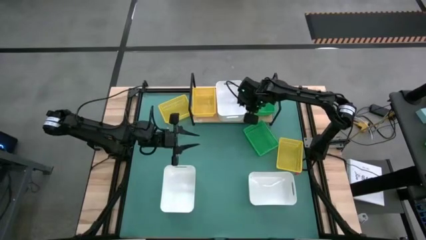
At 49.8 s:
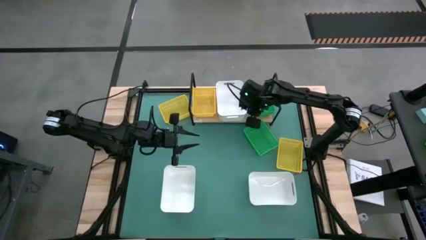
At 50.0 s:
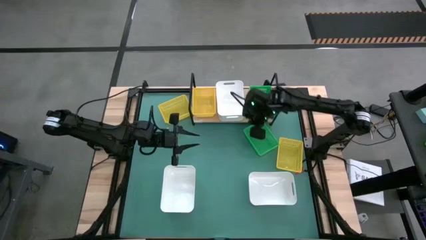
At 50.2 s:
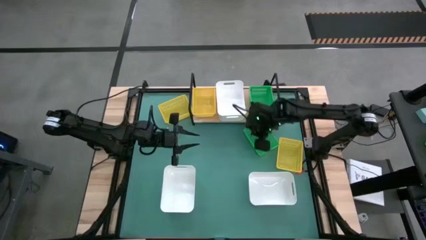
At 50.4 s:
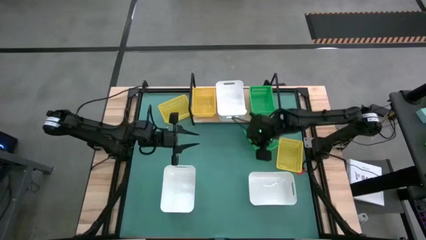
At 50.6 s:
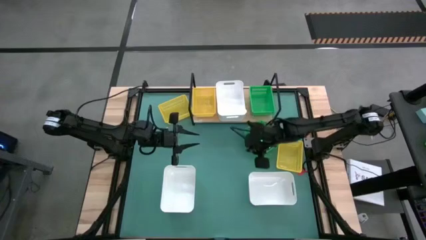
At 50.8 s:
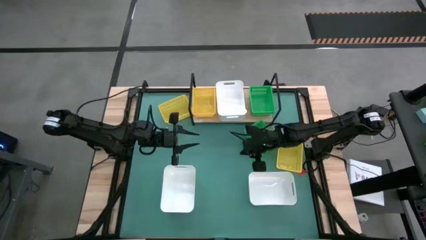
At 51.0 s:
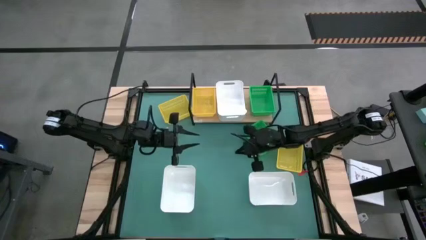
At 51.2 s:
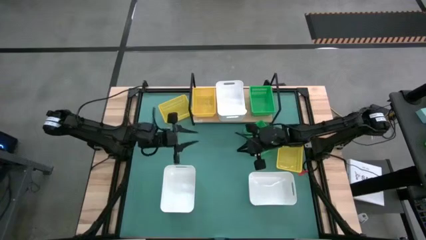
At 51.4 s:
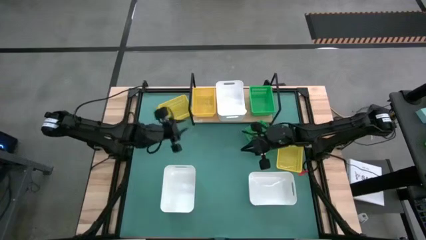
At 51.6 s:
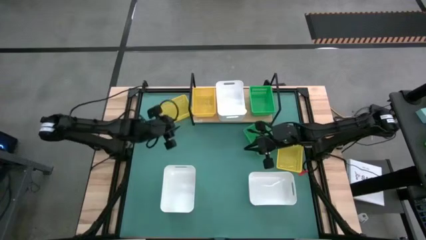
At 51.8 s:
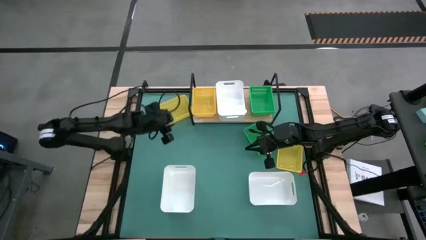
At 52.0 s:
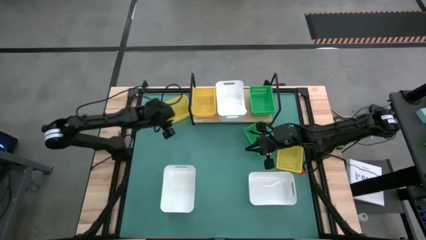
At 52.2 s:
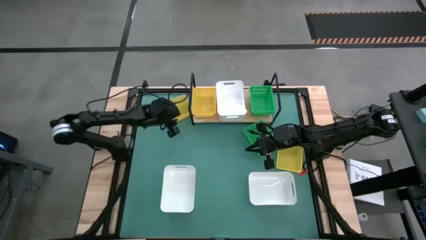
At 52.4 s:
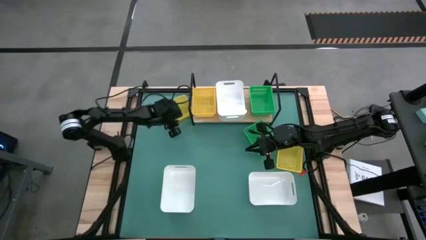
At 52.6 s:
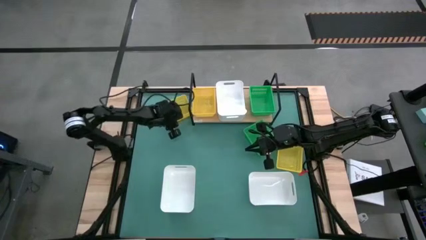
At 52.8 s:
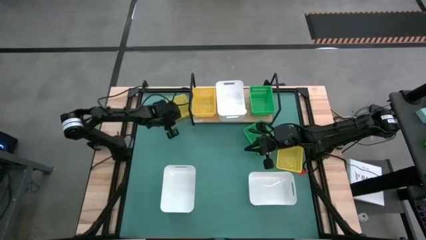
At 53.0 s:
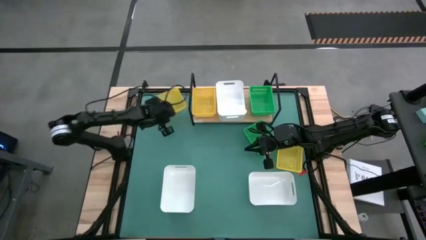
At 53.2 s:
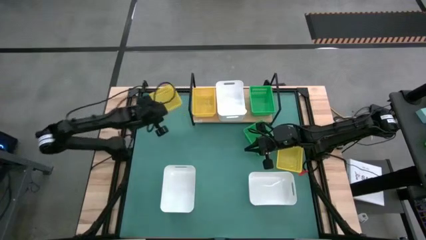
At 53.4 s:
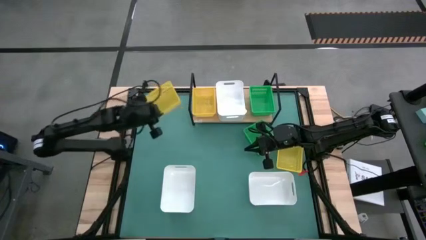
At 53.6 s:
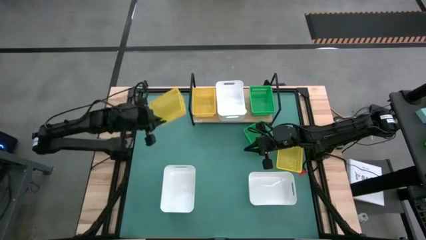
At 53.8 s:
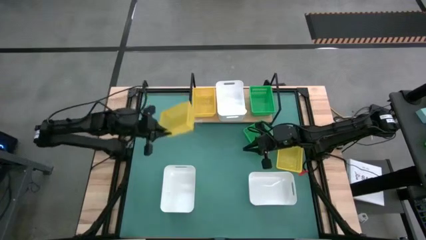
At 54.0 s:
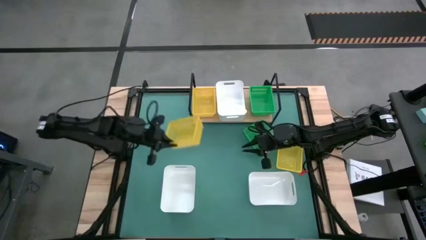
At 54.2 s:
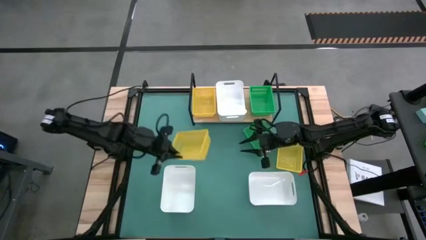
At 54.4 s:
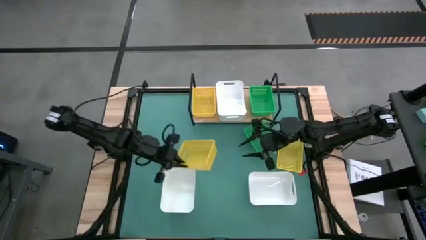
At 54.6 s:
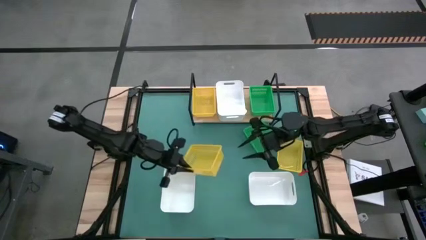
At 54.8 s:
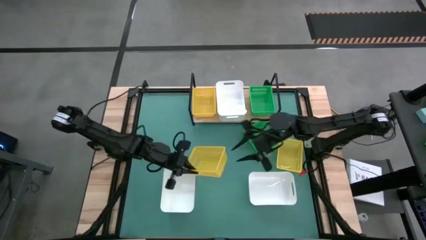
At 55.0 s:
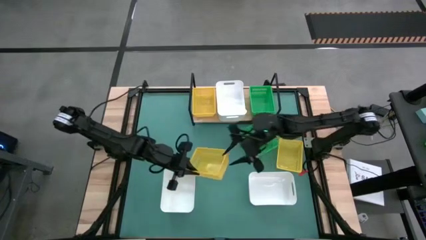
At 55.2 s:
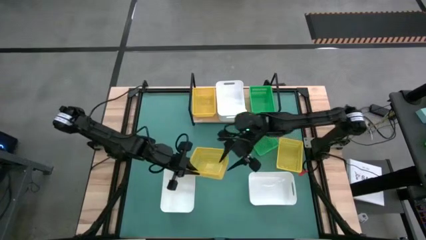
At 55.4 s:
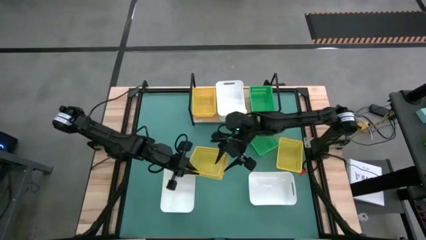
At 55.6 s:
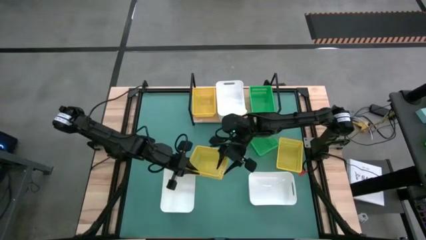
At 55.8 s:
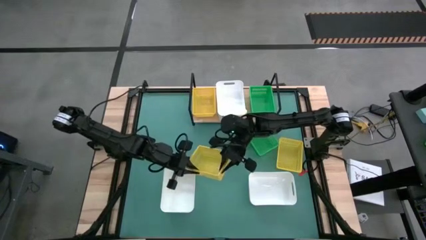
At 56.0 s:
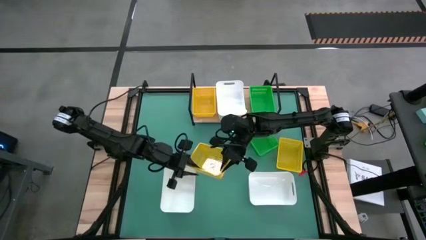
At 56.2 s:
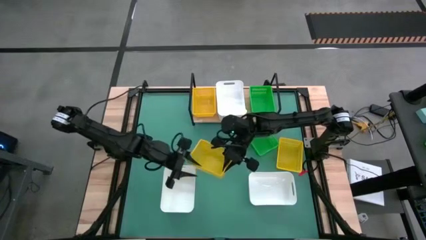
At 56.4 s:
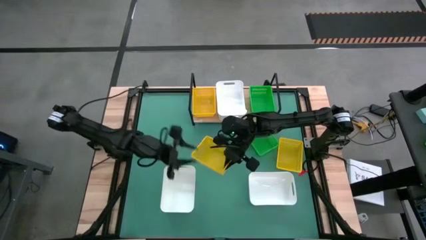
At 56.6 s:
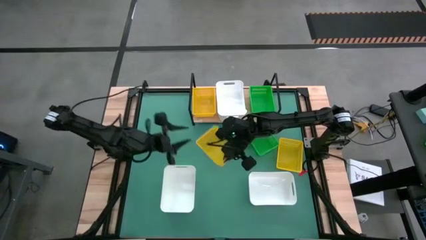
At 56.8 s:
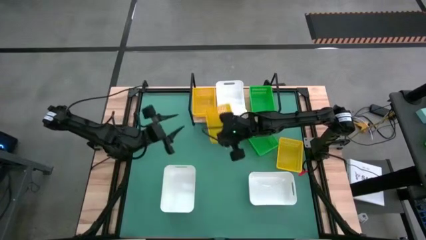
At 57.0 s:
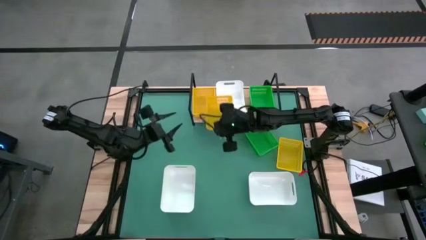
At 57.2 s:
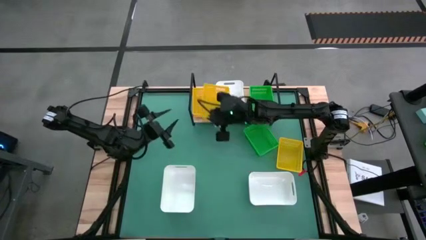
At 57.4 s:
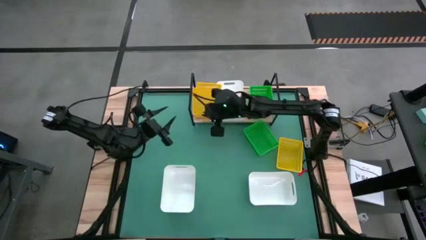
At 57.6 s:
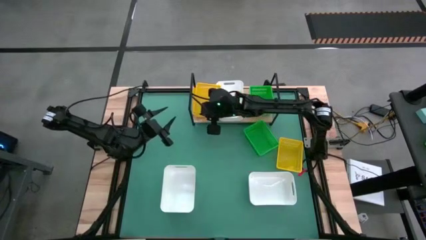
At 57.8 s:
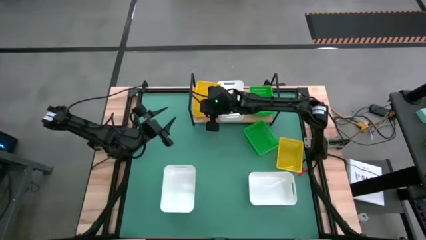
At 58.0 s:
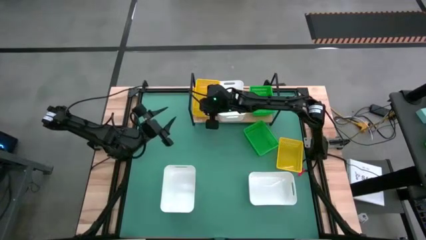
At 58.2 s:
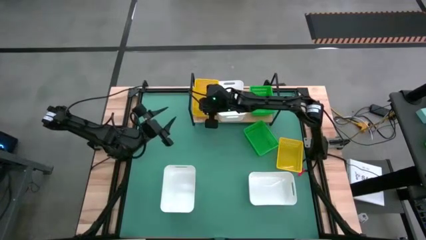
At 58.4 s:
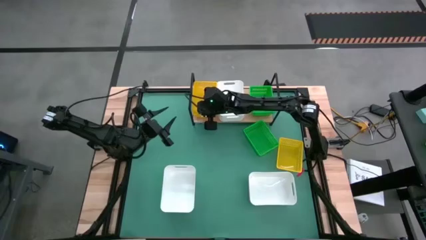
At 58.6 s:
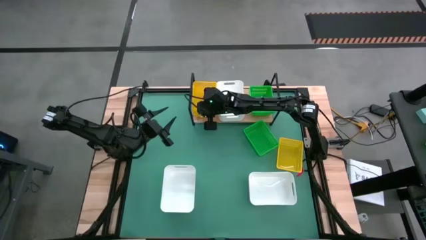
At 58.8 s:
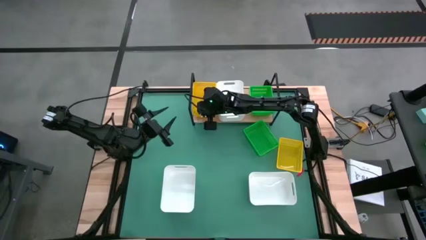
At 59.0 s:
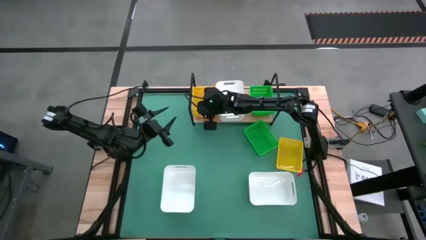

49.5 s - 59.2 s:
Task: Stack baskets on shelf by color
Stack the top yellow bin on top of the yellow bin on the shelf

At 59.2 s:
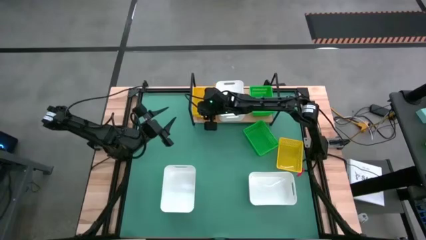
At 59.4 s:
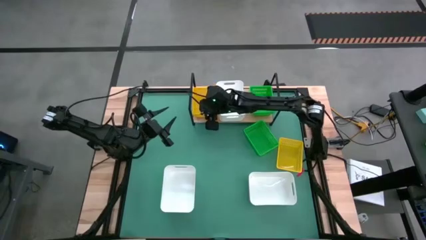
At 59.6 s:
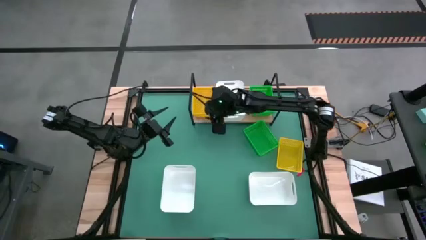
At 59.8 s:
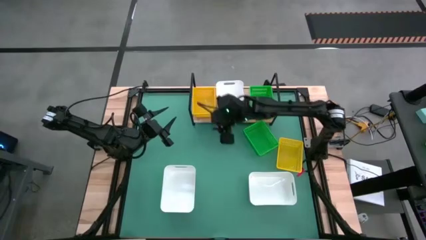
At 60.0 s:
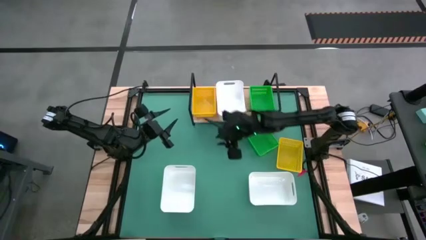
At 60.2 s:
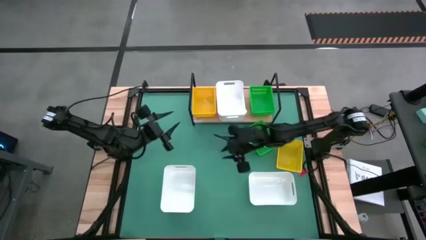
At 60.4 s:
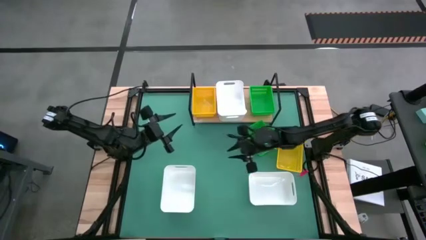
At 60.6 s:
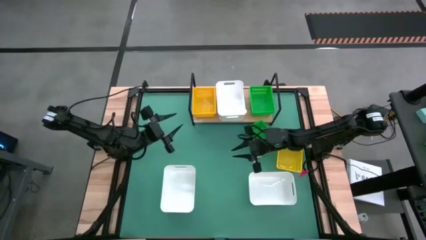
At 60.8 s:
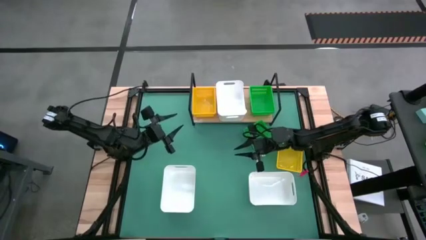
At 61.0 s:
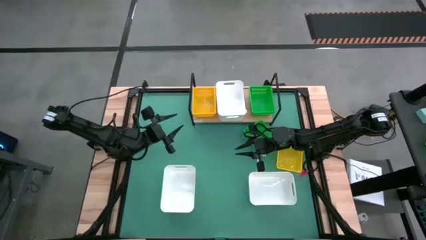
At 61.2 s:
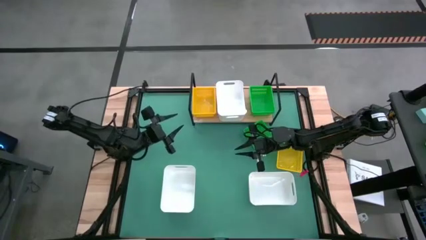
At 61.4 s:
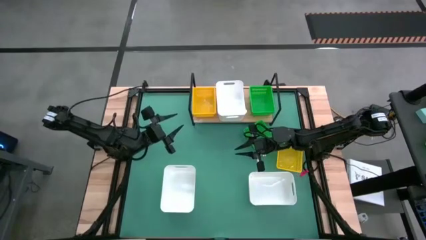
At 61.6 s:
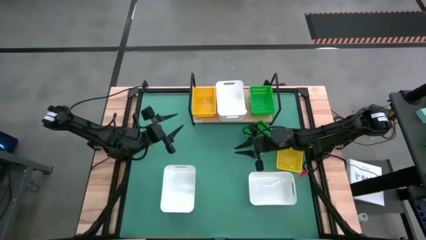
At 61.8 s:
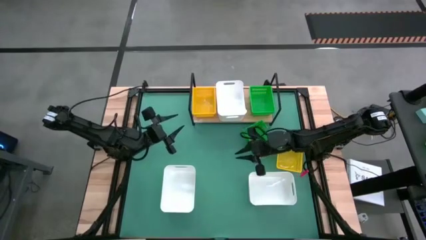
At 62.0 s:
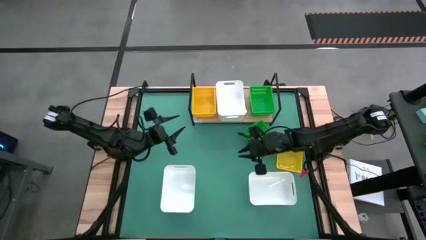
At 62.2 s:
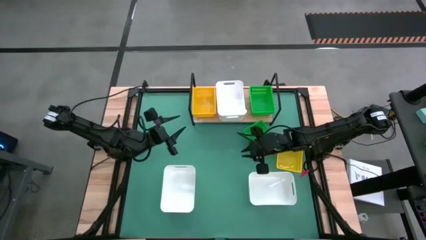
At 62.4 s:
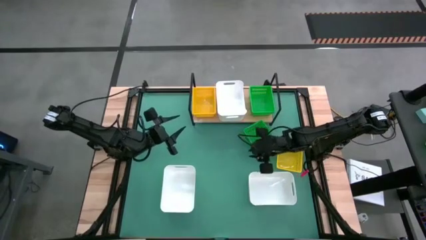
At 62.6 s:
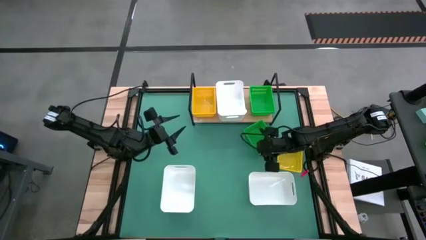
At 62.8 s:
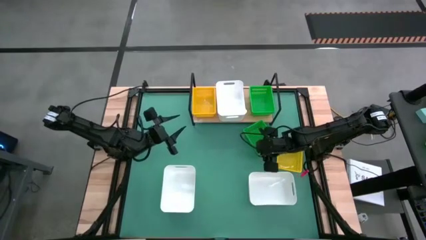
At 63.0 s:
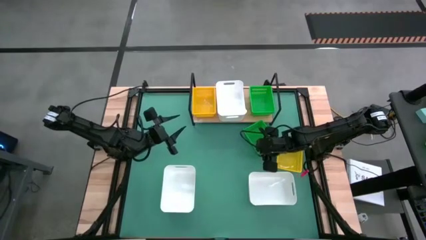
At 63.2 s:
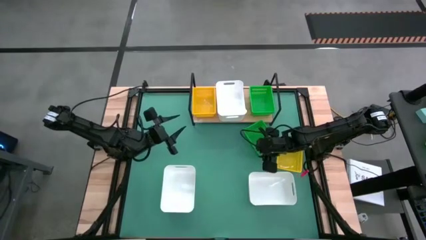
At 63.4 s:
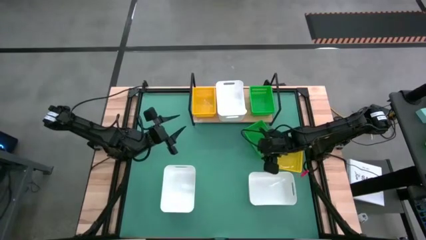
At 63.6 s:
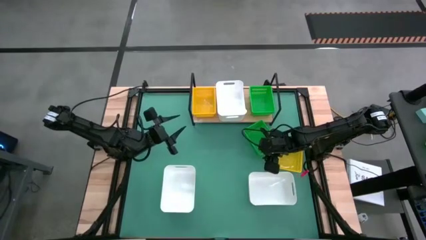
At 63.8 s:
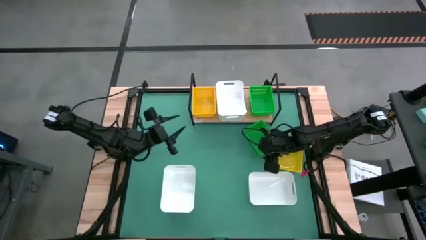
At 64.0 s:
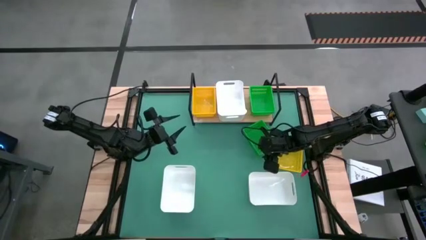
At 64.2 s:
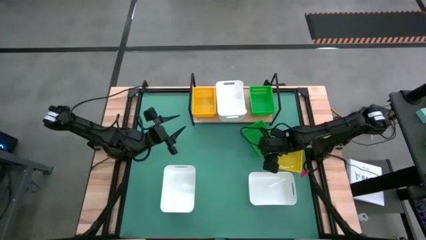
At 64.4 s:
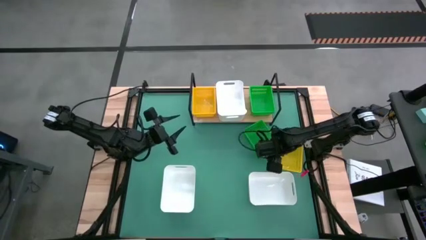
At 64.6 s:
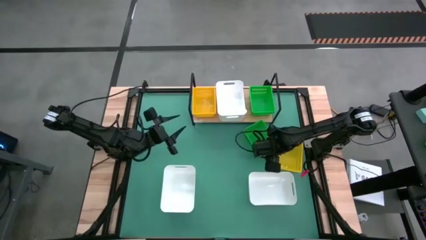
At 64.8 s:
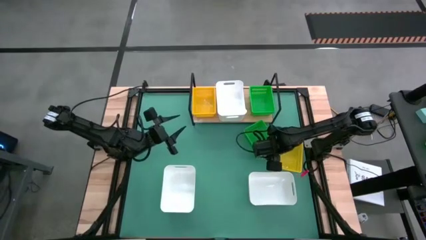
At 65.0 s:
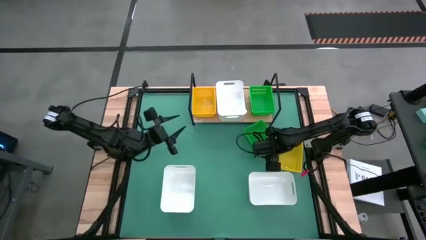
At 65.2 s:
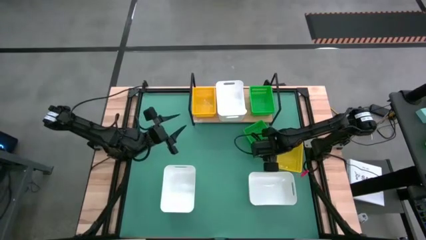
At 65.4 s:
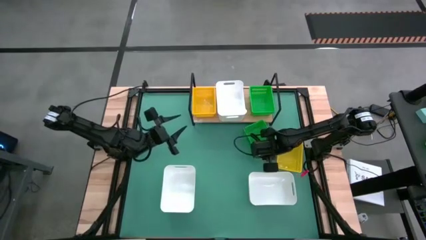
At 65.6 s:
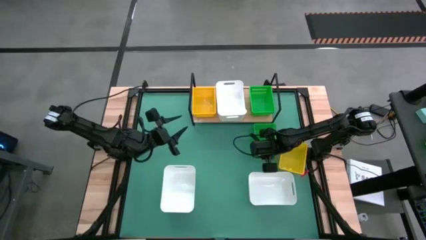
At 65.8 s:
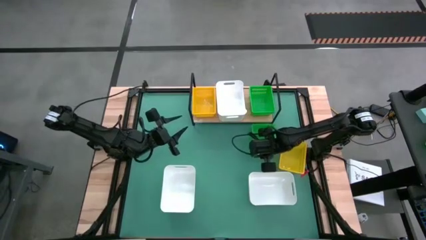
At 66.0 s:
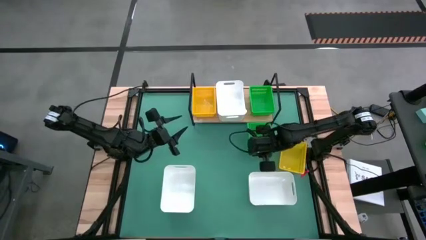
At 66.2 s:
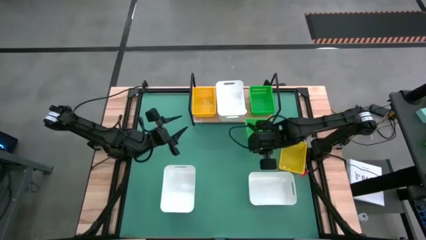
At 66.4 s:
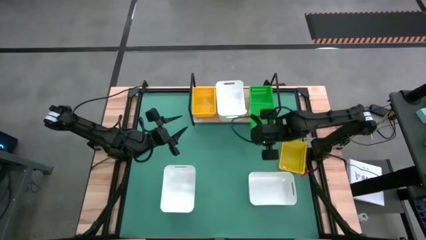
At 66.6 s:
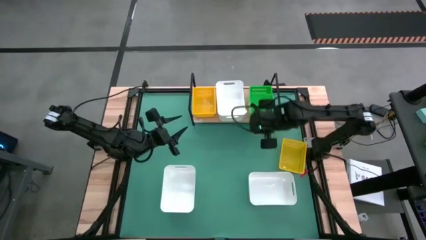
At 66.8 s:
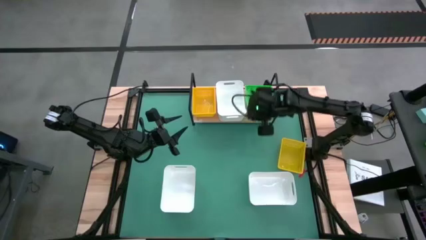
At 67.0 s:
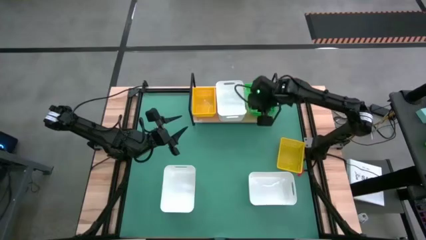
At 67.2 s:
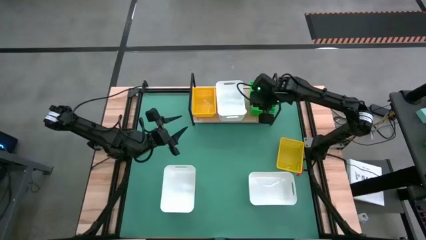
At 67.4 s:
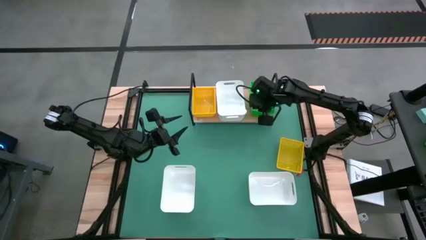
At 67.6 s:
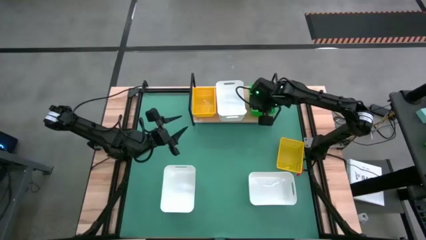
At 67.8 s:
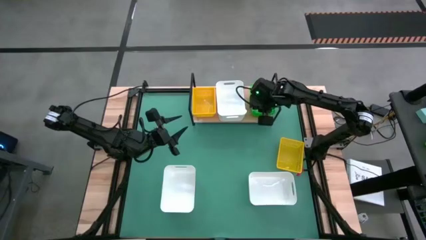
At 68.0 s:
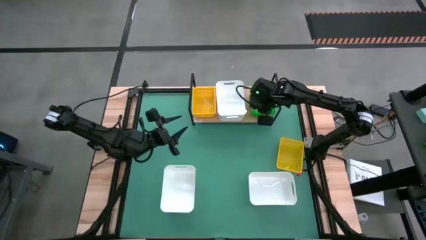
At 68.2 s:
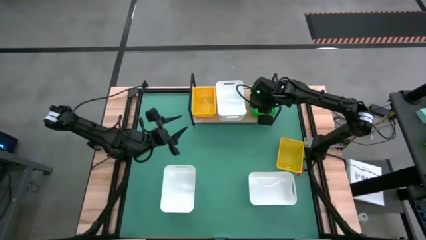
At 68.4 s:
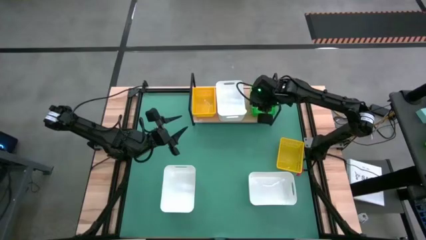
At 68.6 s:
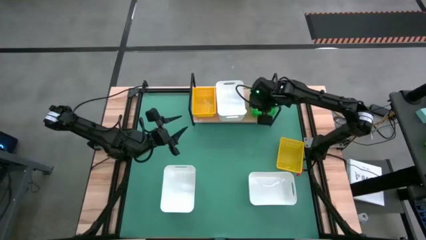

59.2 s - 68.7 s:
Stack the green bin on top of the green bin on the shelf
